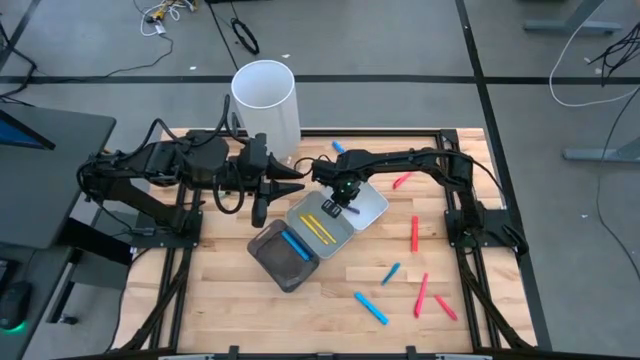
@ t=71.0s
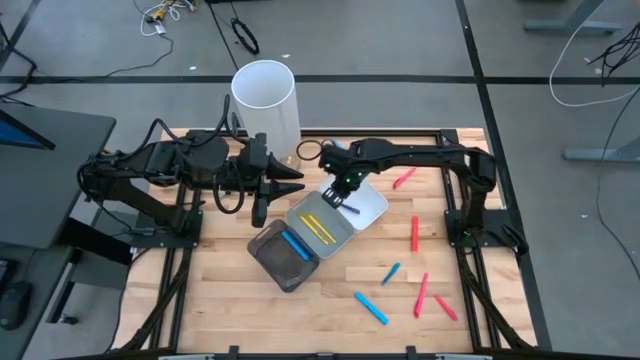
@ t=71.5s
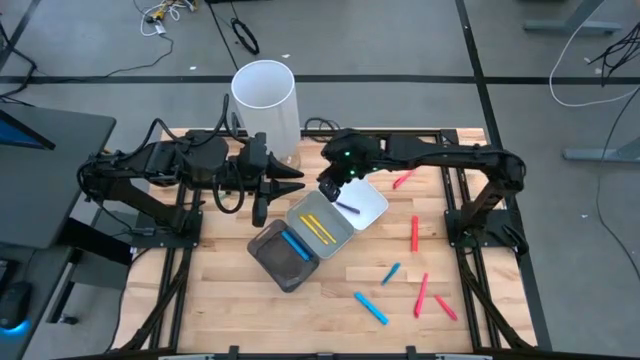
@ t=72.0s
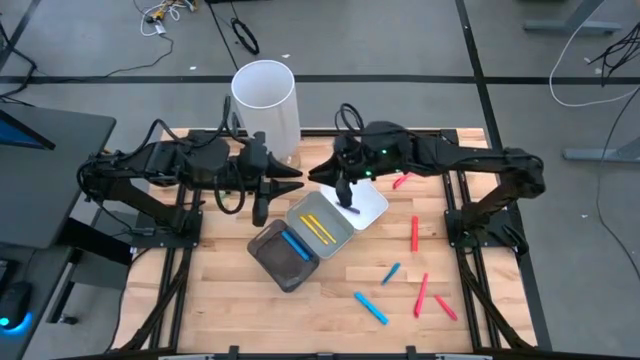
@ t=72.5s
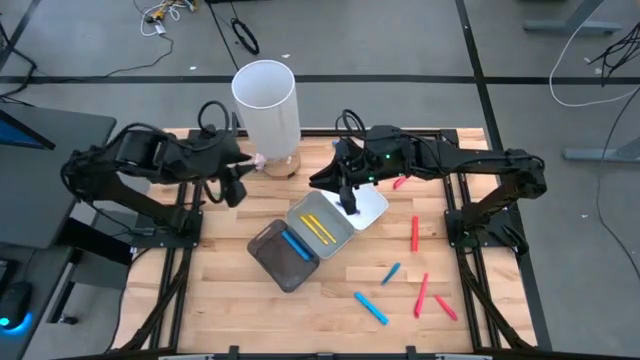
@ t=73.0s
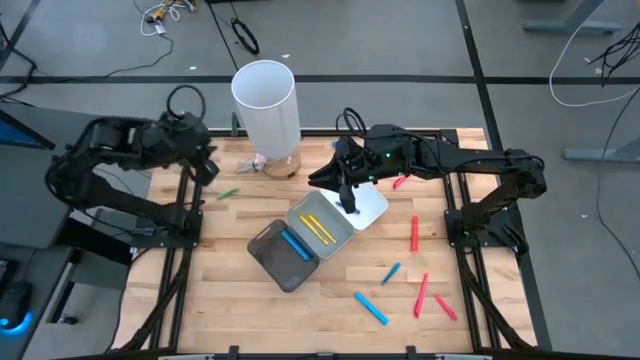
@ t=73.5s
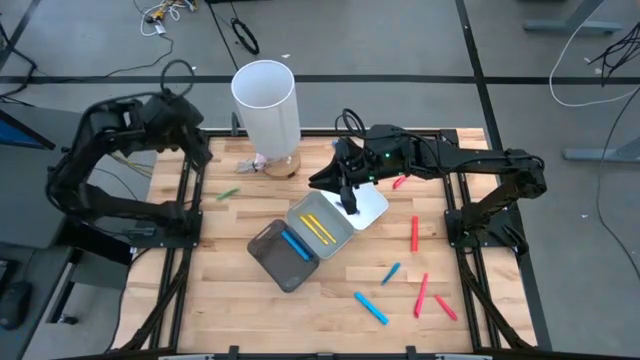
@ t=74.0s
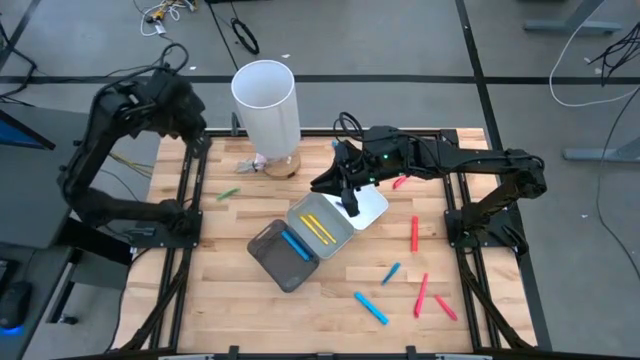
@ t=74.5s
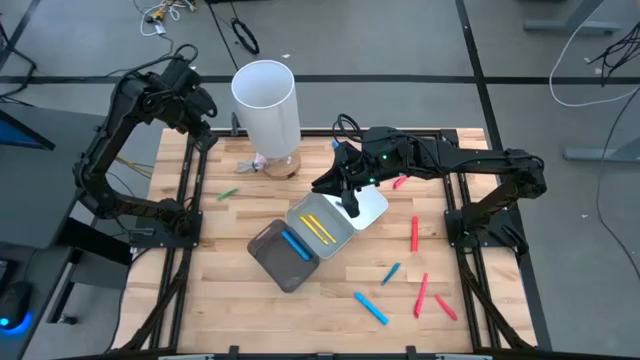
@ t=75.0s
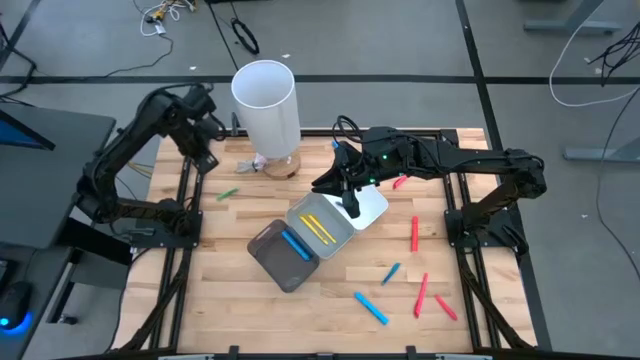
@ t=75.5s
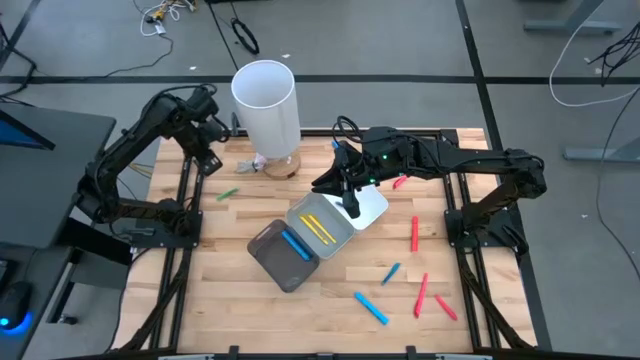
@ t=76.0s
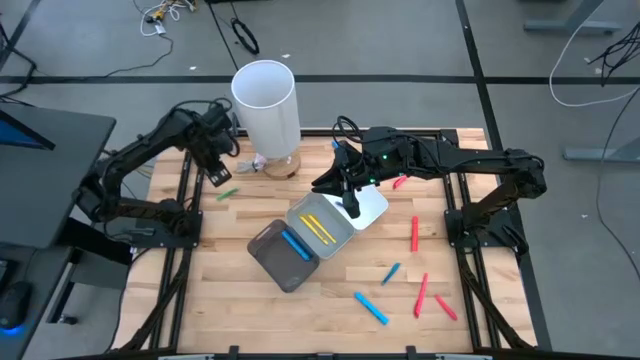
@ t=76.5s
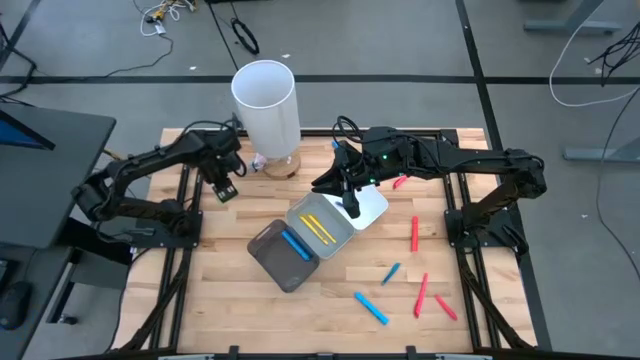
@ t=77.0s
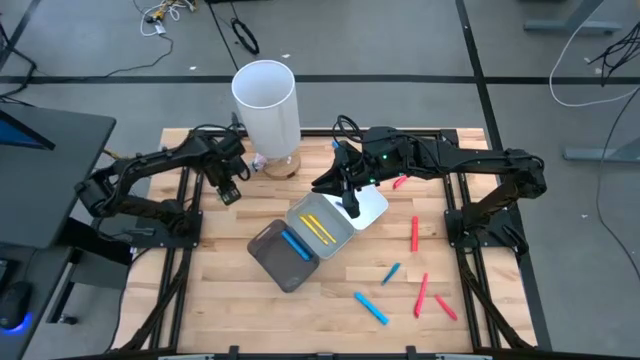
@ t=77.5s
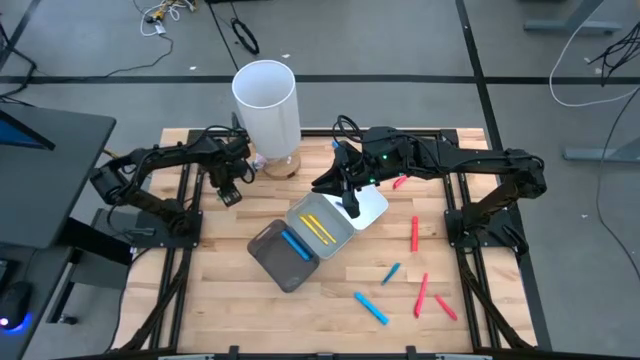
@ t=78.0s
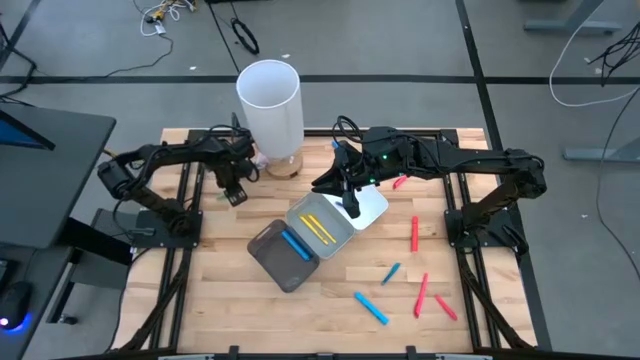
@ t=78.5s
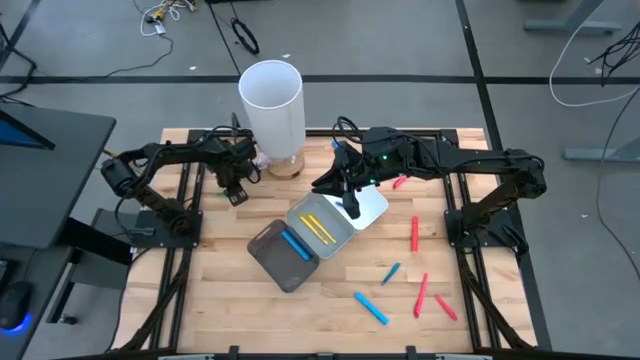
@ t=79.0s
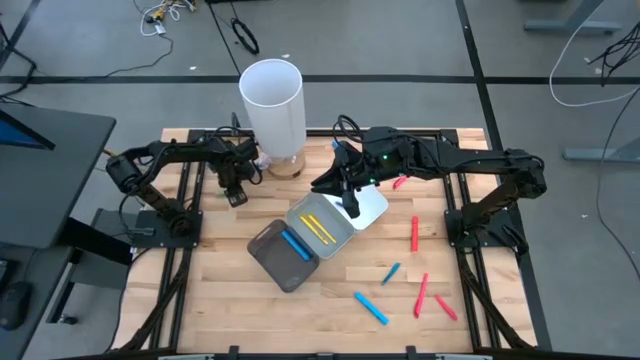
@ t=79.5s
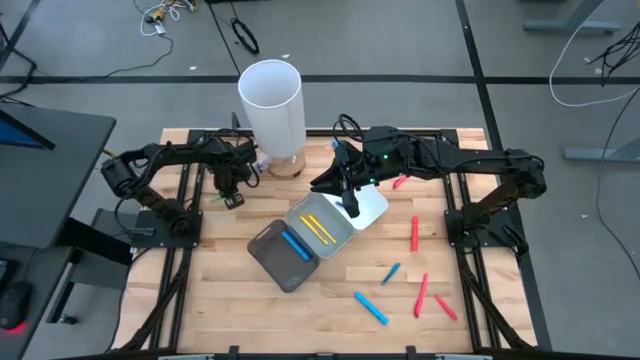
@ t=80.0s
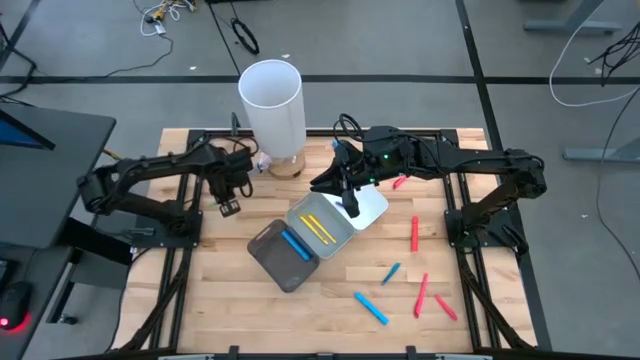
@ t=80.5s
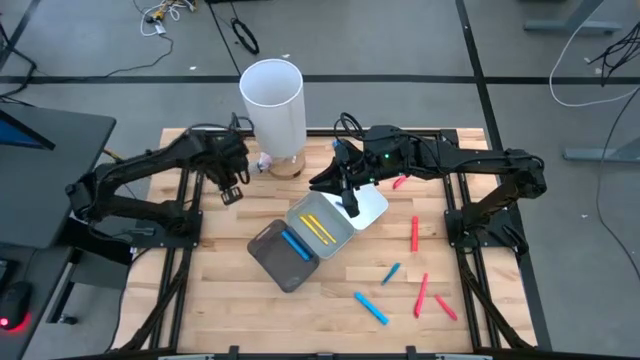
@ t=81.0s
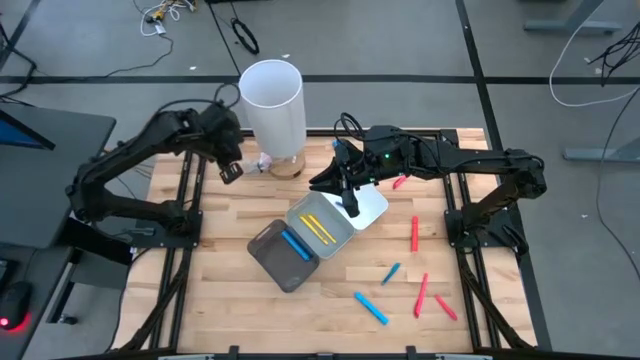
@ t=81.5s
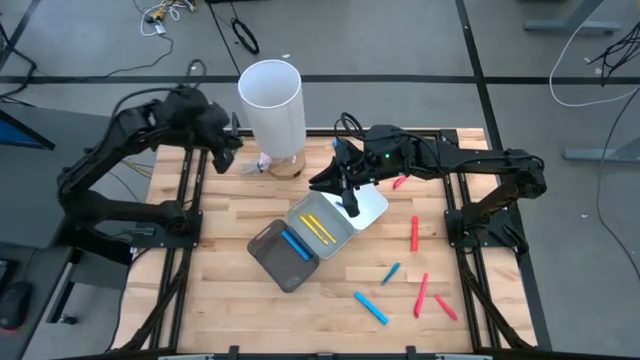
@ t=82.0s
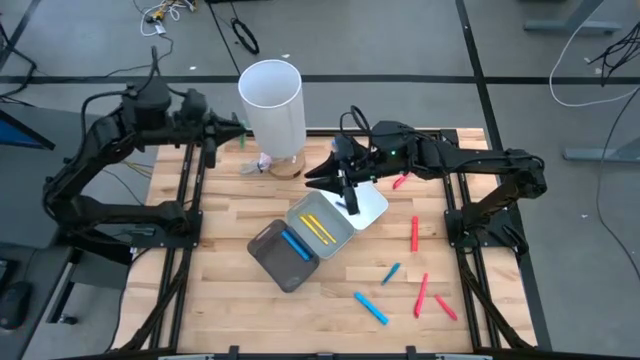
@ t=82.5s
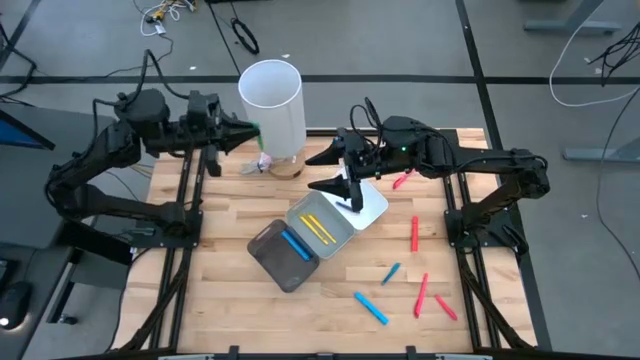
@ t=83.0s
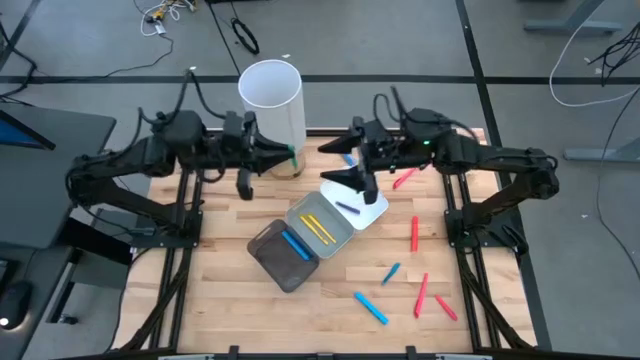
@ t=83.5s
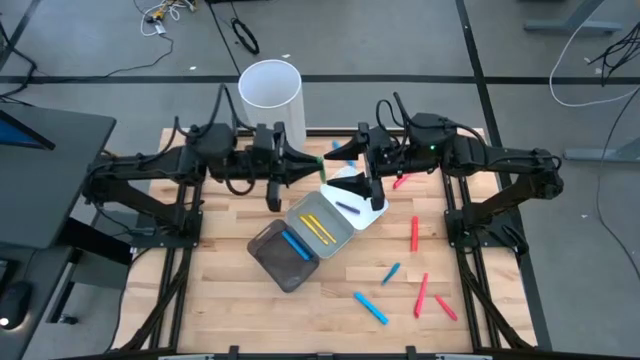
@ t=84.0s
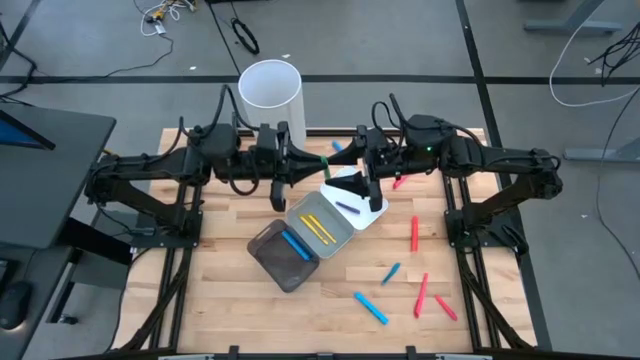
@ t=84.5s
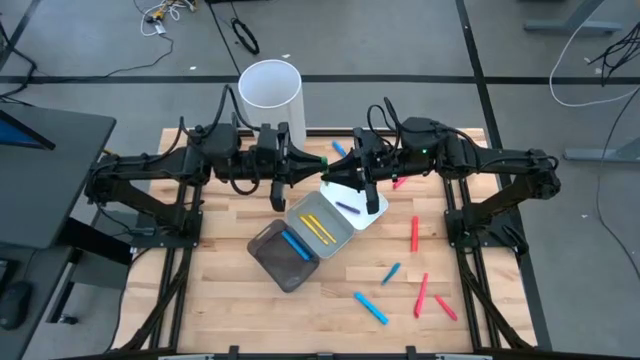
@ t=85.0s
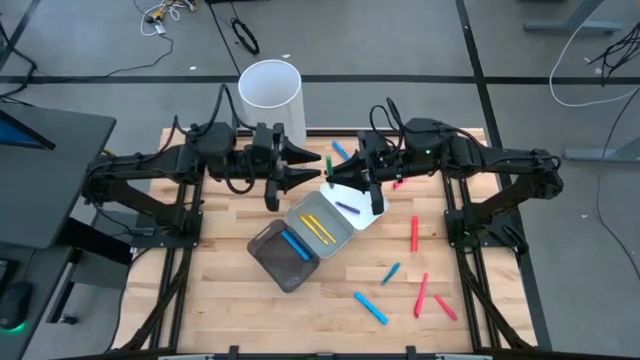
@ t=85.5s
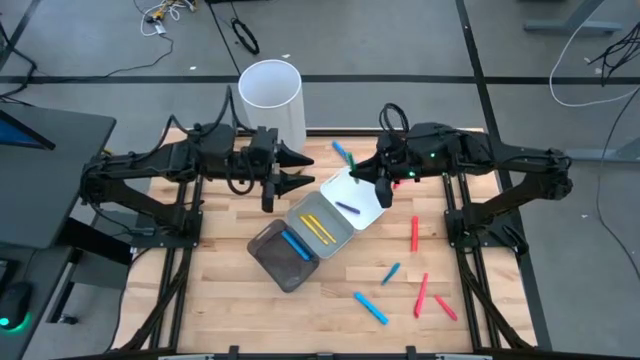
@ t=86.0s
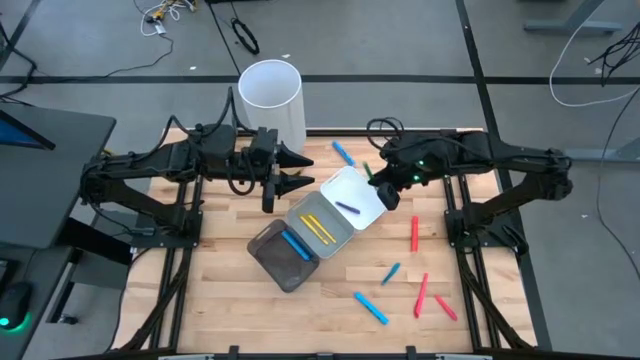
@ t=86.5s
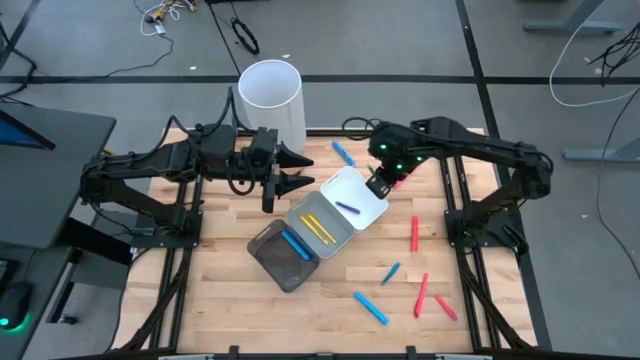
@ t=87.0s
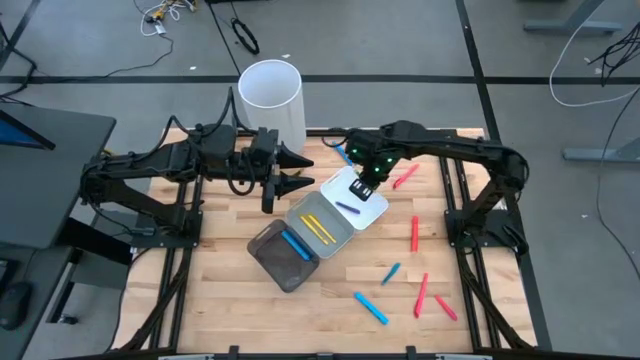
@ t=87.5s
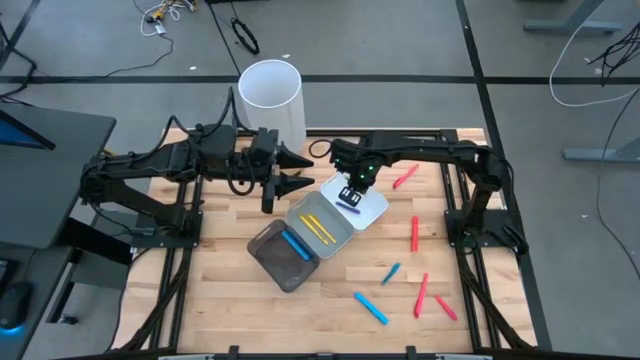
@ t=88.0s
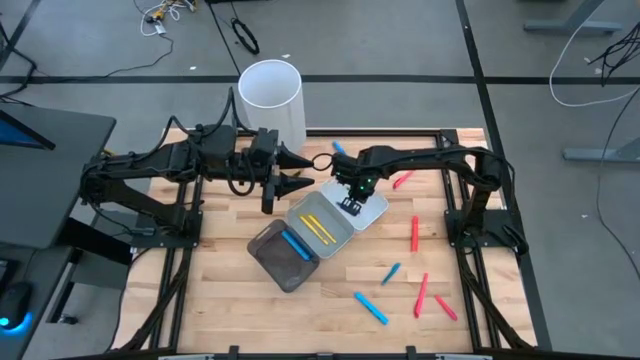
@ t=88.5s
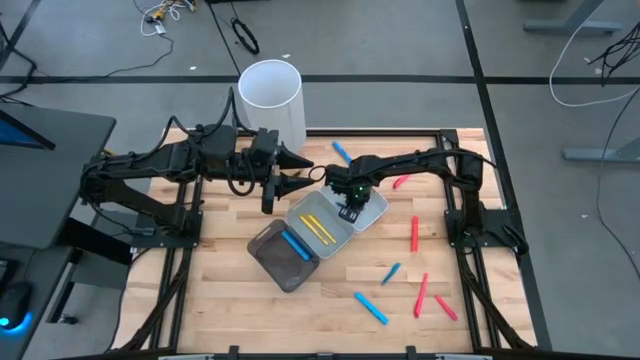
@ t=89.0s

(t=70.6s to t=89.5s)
Task: Pick & Place Markers
Put the green pen into the white bin

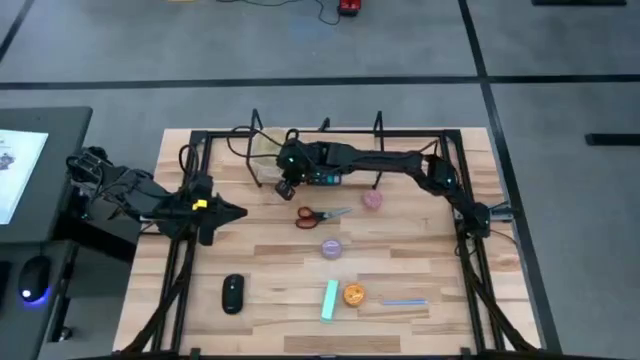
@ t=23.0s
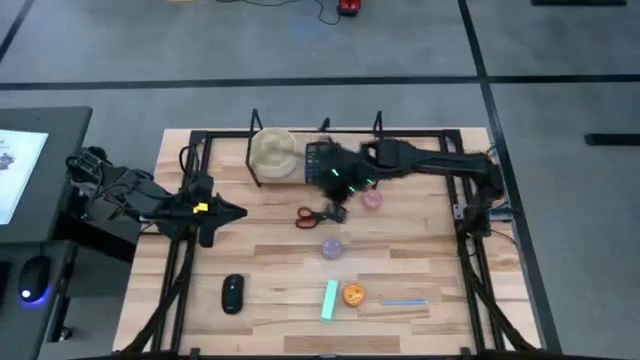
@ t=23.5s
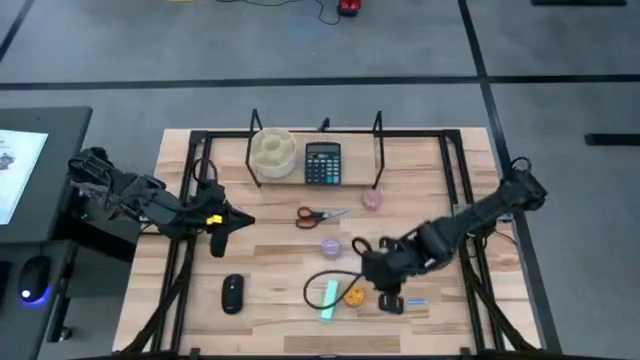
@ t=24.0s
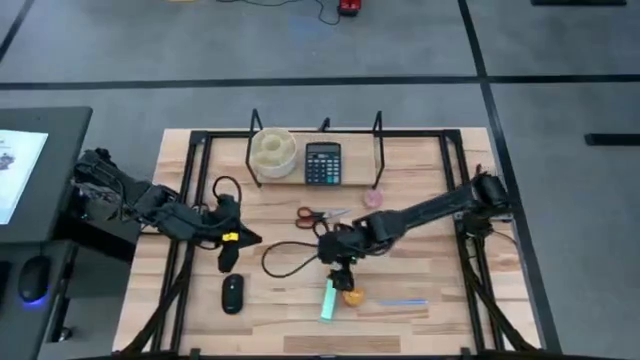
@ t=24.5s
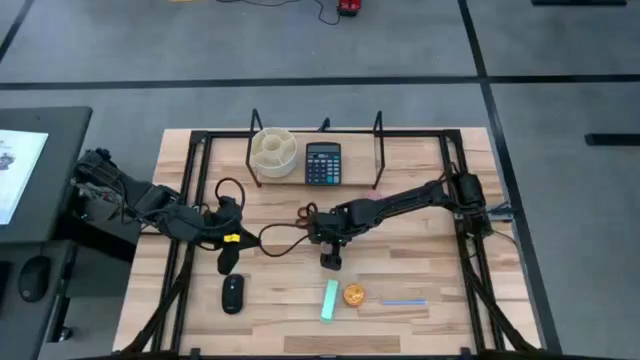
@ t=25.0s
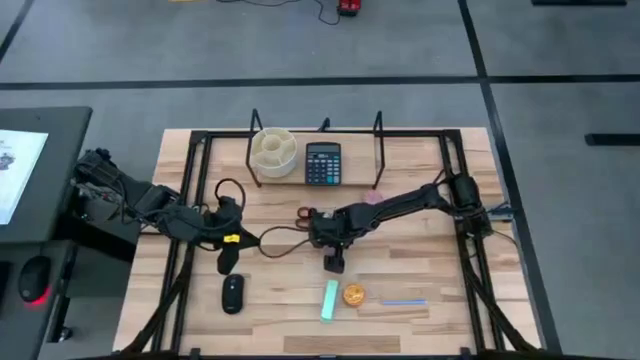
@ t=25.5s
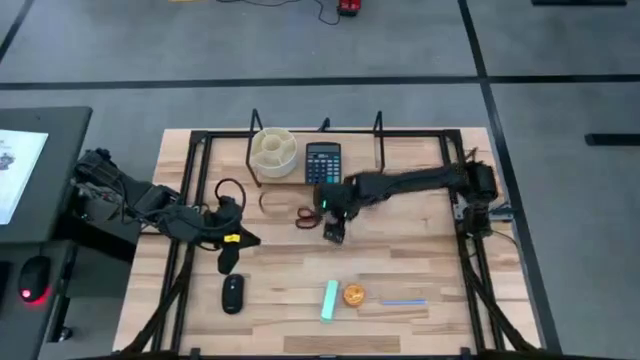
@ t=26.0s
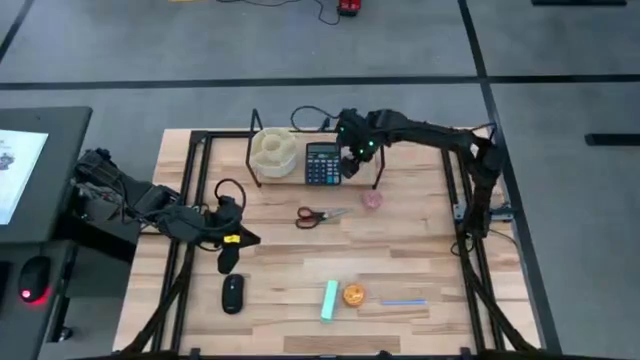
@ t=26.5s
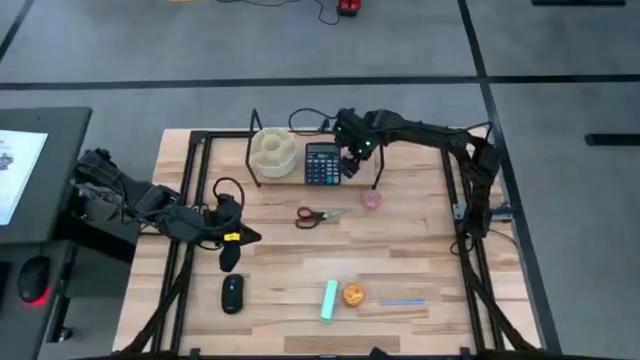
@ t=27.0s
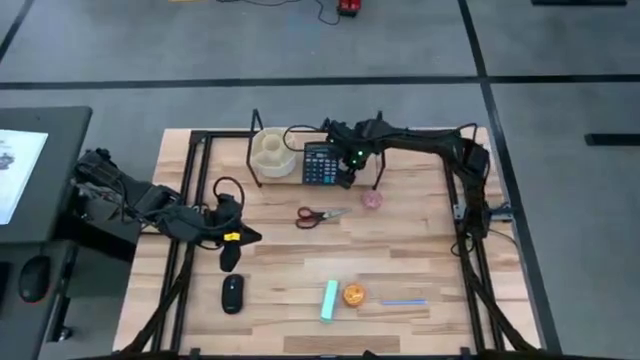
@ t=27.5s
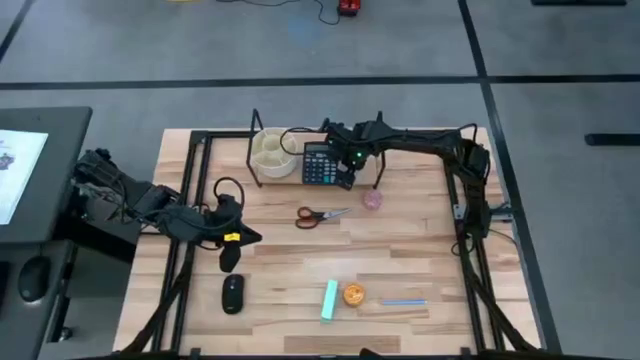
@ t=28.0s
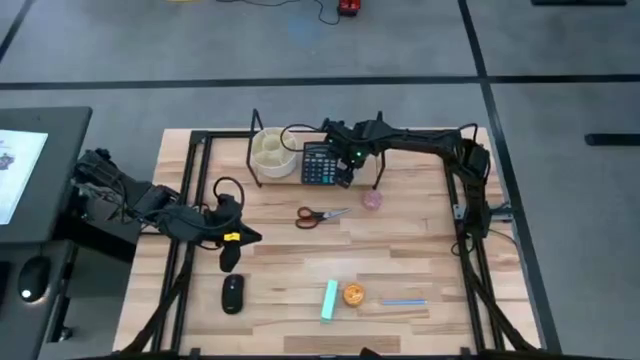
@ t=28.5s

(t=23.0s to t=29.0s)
Task: Stock shelves
Put the purple scented candle on the shelf
